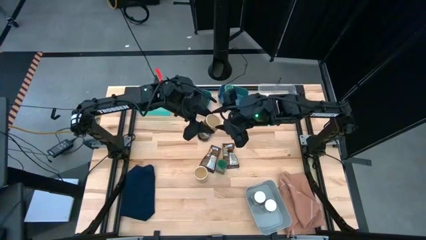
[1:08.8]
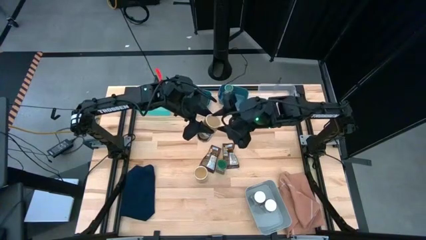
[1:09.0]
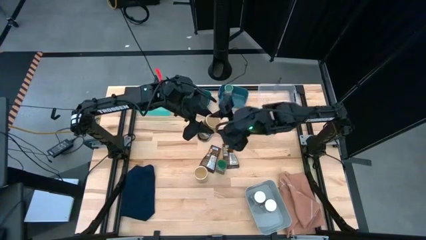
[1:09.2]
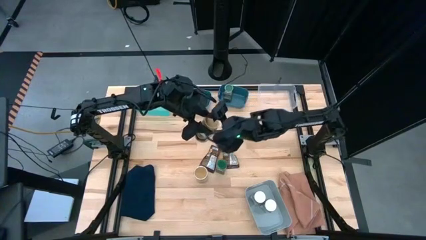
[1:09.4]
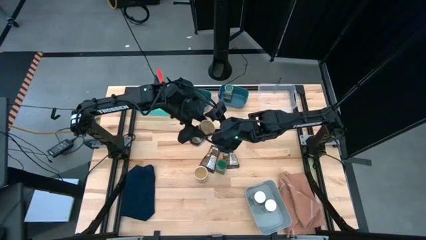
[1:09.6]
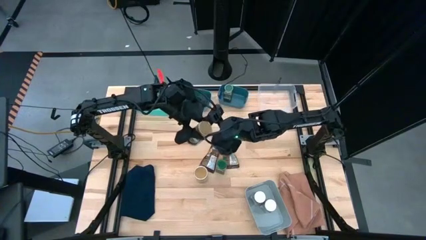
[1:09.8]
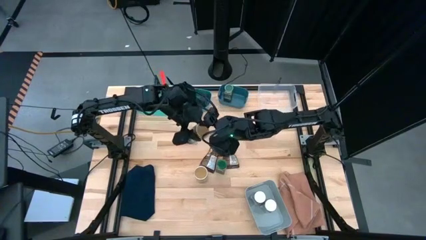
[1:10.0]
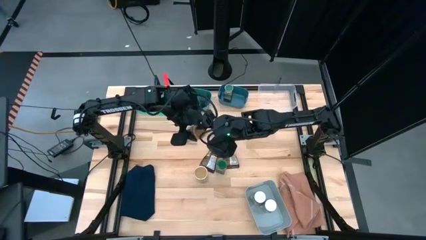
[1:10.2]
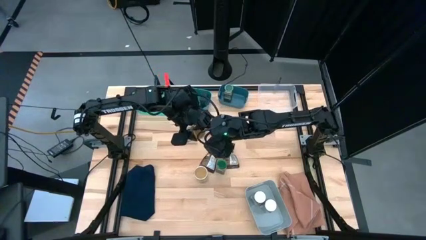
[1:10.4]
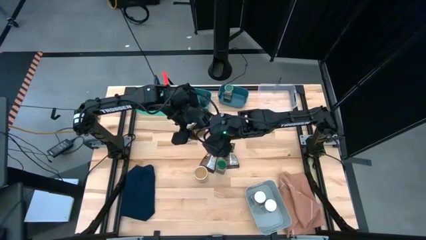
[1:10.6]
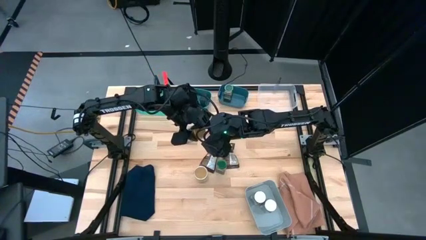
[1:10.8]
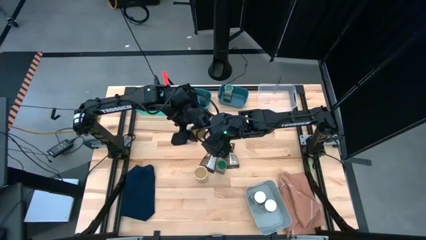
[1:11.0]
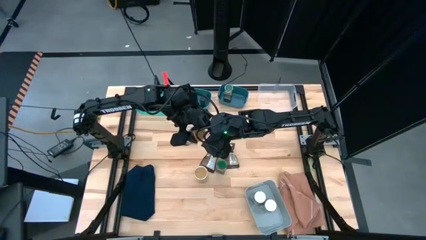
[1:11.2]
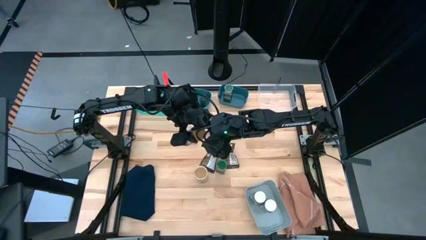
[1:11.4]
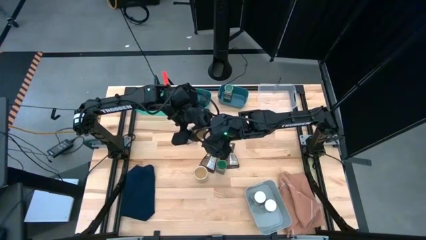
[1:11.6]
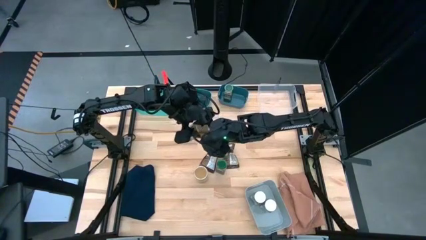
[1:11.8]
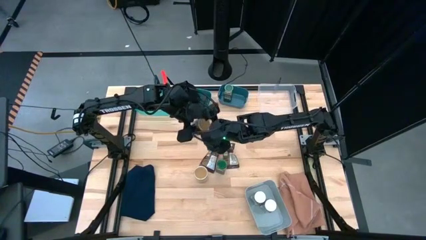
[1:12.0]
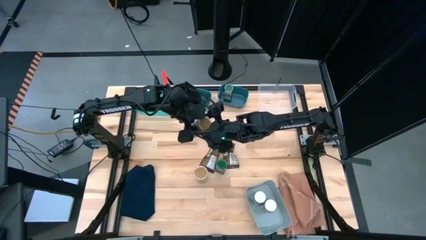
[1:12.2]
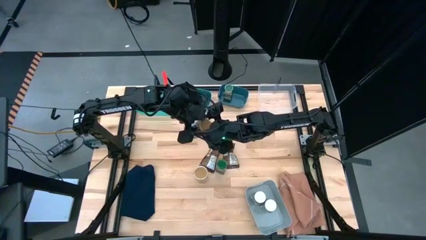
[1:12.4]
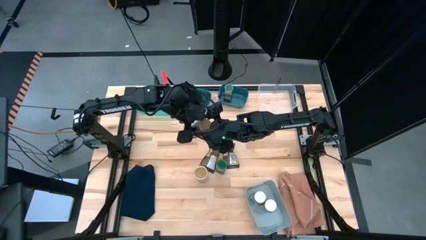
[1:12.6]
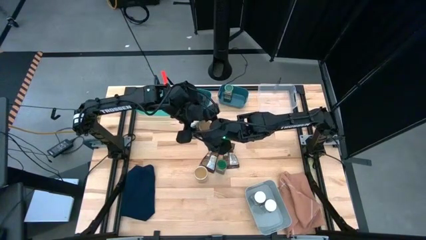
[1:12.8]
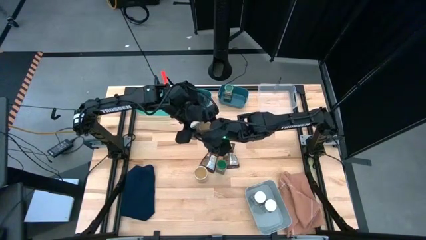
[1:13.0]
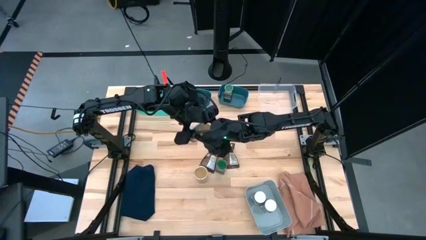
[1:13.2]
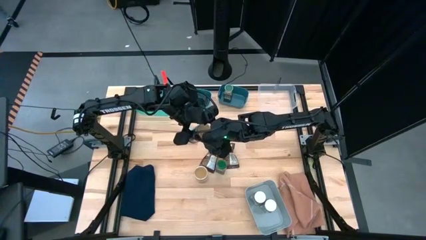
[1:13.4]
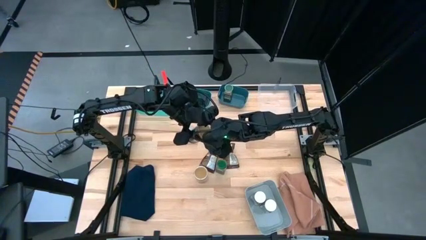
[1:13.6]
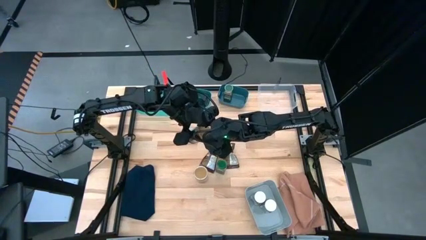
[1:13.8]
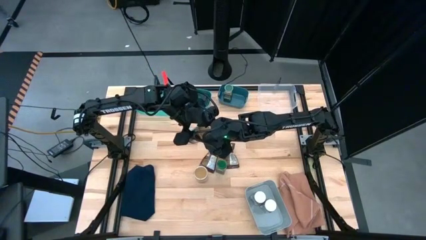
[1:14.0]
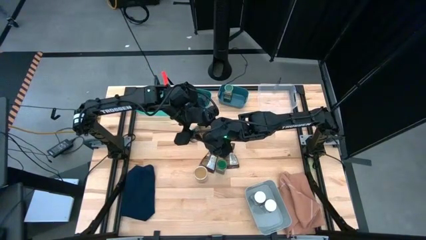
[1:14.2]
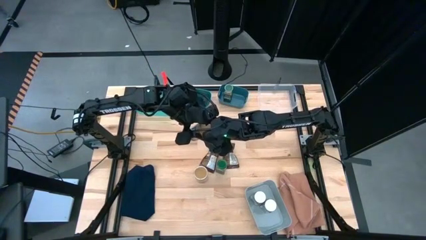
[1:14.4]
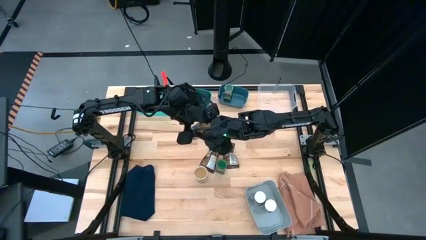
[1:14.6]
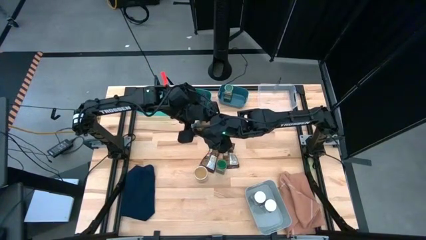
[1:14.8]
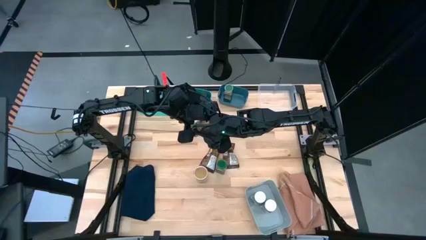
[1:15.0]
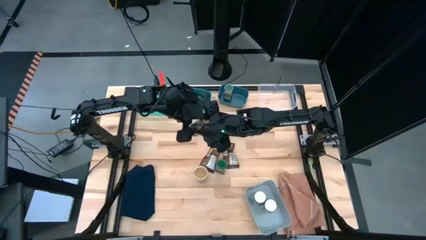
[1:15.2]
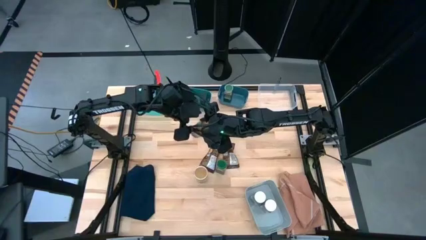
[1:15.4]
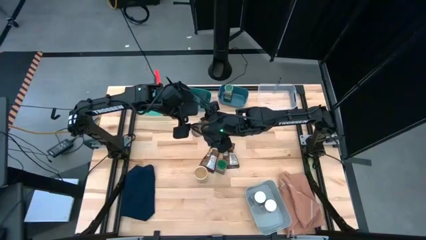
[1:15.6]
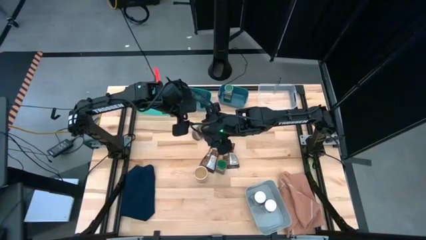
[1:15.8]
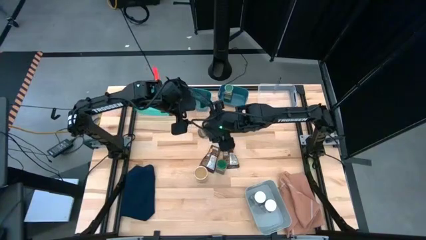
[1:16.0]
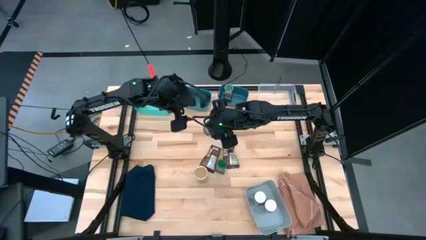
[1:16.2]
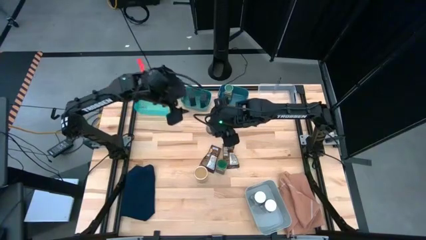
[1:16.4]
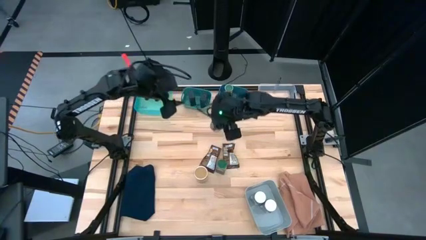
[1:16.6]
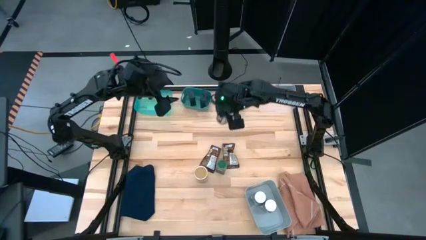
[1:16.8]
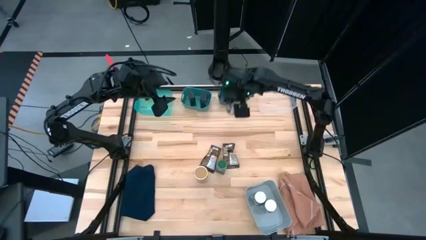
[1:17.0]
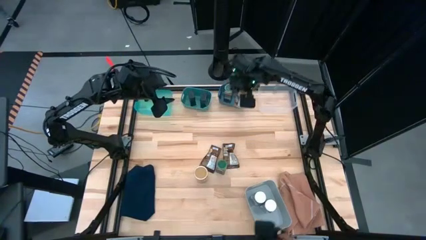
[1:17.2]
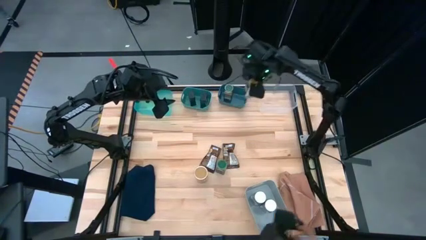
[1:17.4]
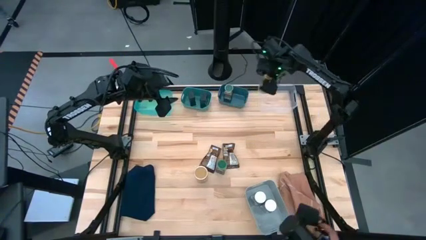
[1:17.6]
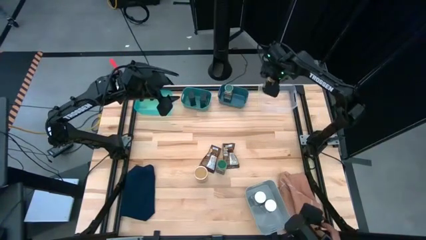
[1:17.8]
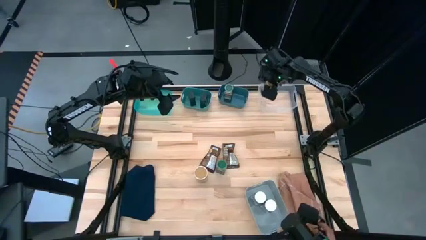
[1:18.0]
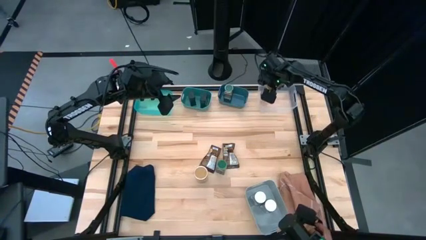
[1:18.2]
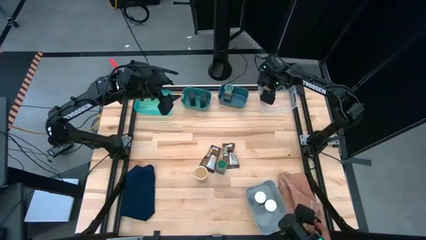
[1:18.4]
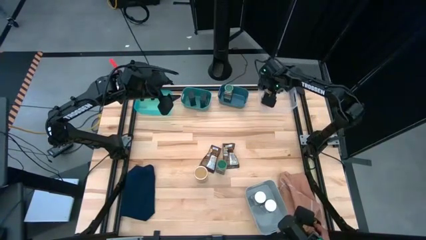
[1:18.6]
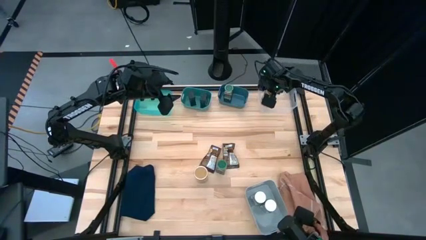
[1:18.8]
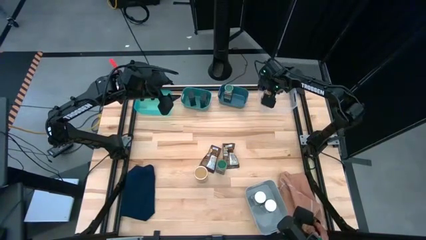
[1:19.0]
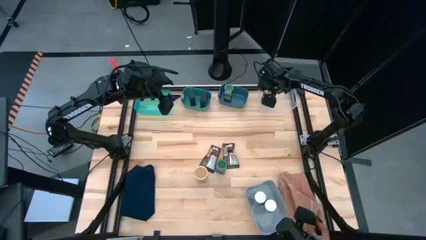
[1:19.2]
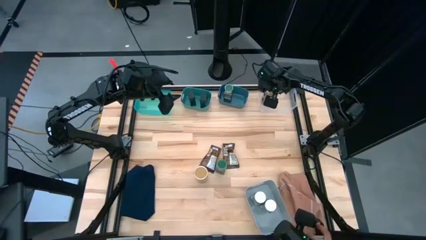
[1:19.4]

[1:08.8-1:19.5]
Task: Sort spices by type
Put the top brown seasoning bottle into the transparent bin

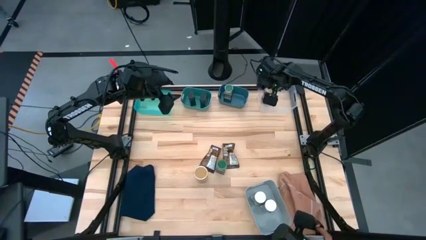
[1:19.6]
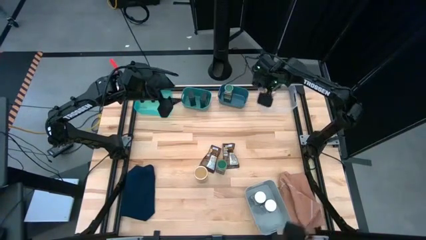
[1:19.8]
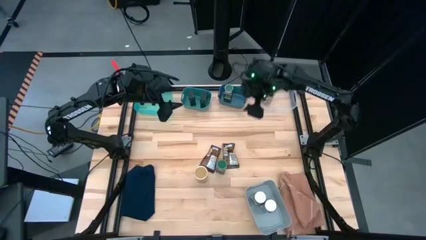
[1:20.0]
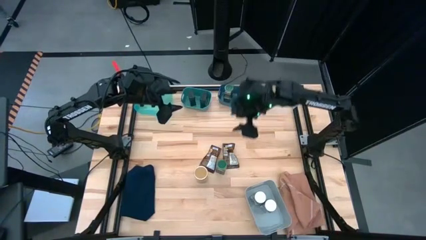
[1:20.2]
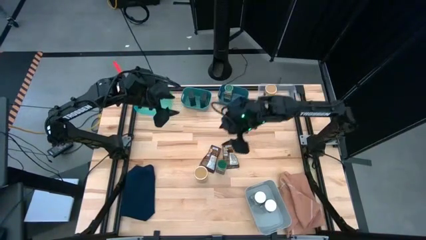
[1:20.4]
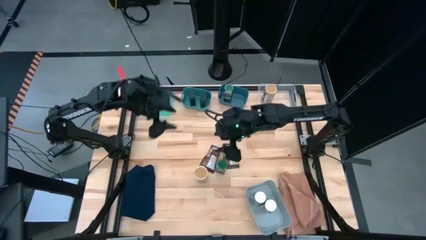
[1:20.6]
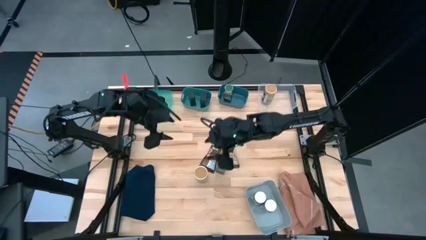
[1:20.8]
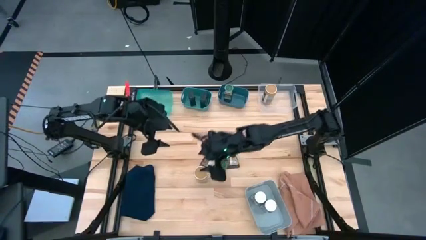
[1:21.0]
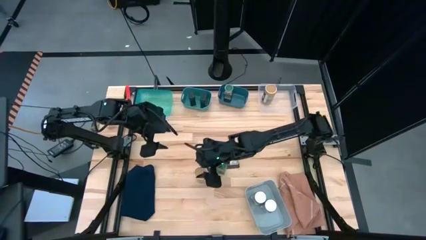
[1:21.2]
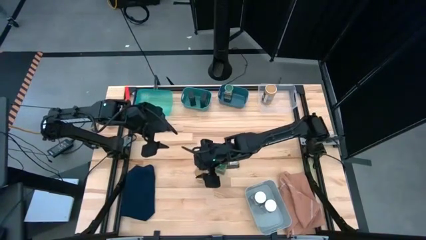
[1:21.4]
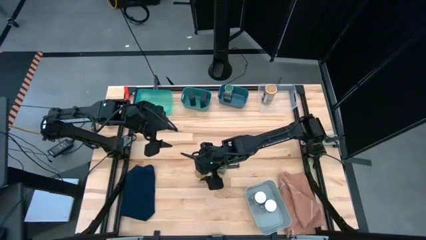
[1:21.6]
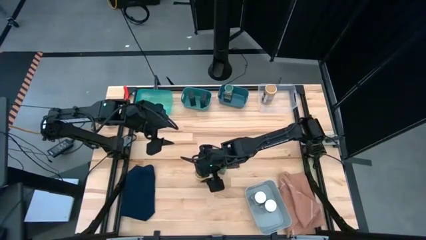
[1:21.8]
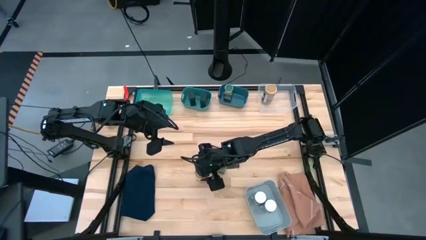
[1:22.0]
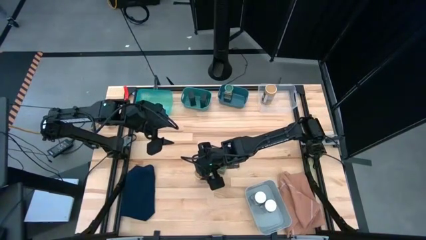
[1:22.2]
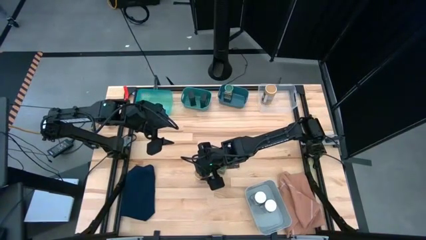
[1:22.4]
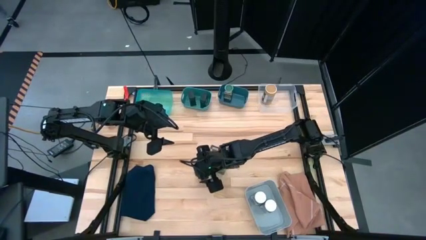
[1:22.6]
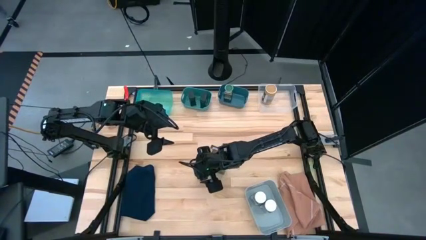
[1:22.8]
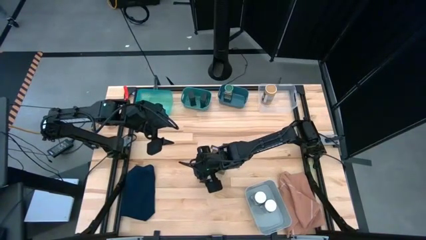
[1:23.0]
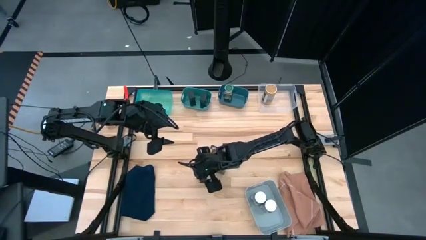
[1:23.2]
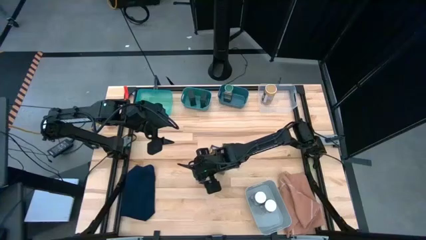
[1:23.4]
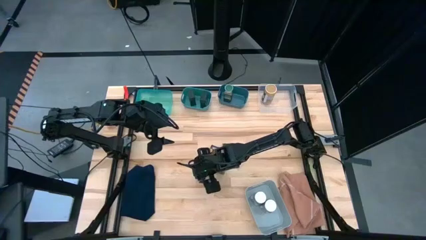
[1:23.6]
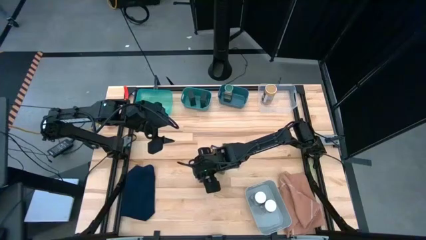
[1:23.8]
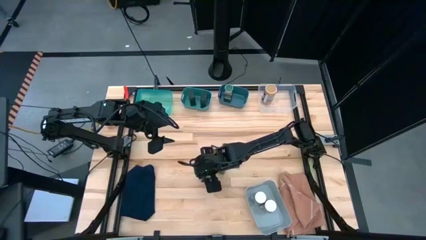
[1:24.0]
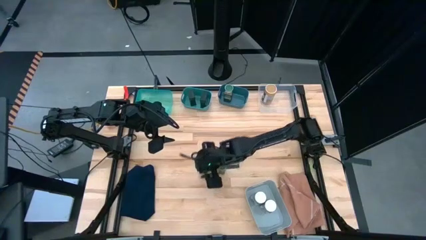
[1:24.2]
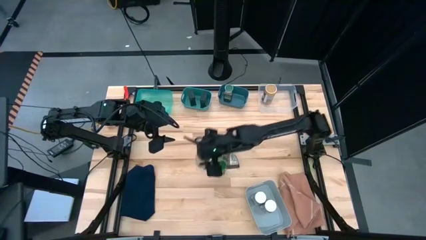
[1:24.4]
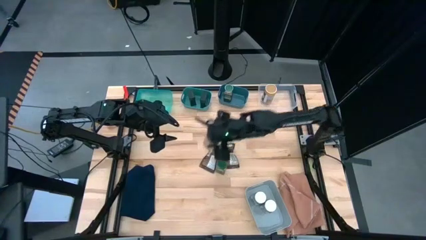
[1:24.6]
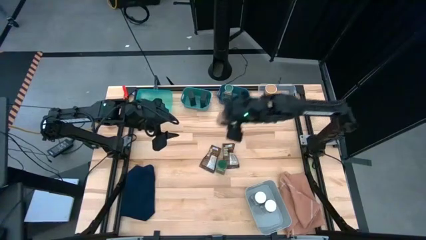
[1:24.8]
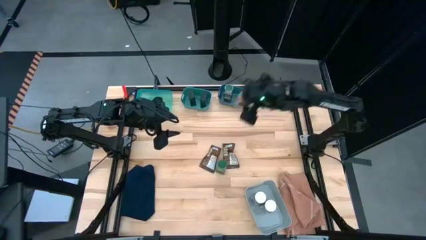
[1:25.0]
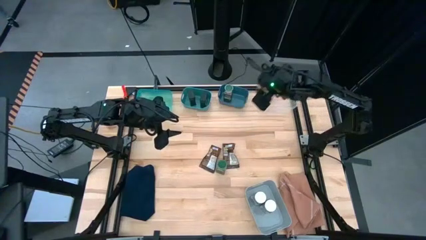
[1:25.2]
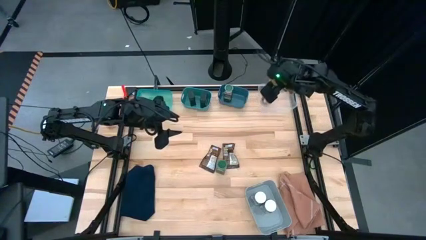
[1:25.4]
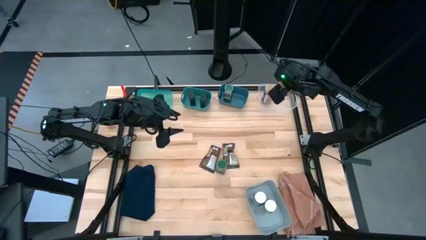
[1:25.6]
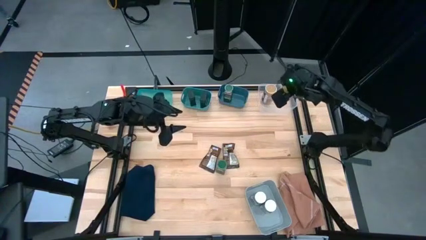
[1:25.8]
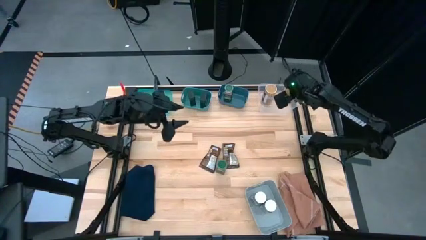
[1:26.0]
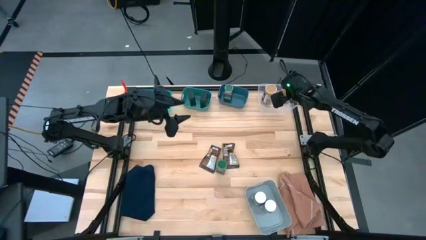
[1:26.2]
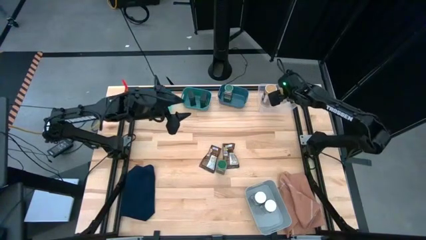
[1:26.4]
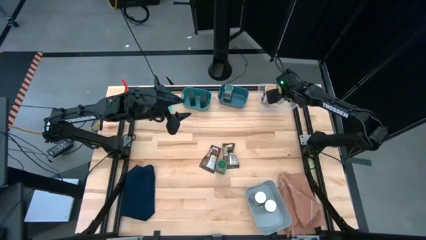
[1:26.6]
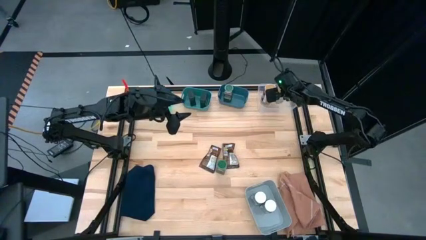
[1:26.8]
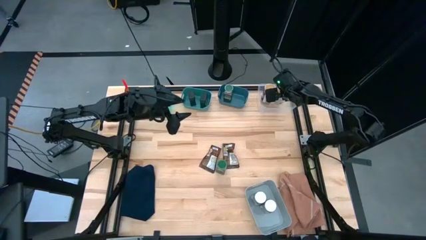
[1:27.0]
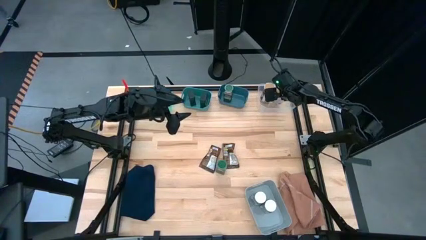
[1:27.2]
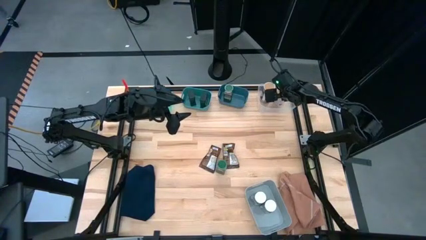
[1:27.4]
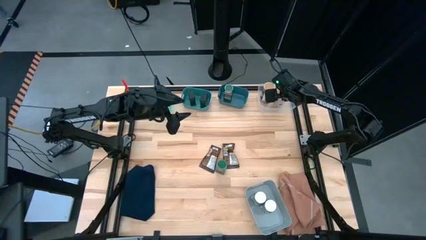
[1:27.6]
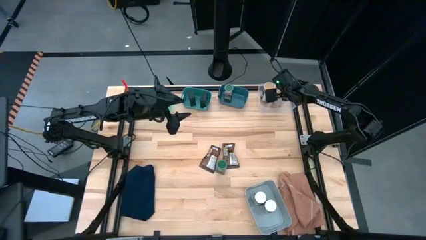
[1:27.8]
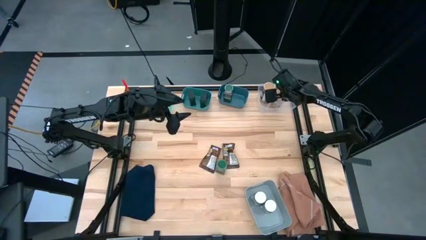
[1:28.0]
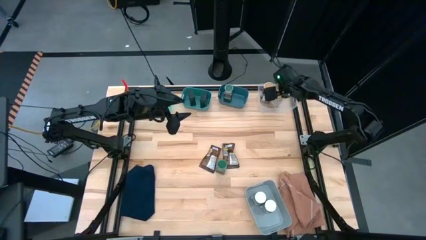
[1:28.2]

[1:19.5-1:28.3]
Put the brown seasoning bottle into the transparent bin
